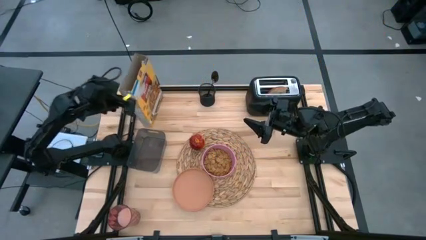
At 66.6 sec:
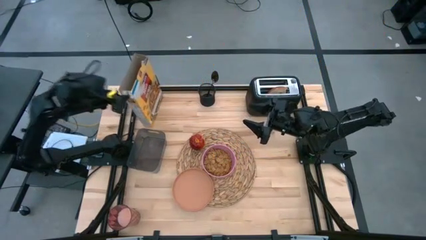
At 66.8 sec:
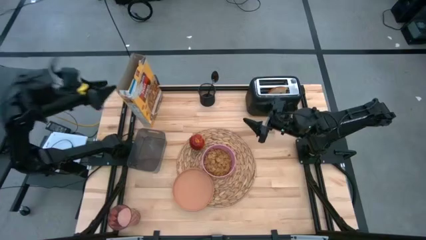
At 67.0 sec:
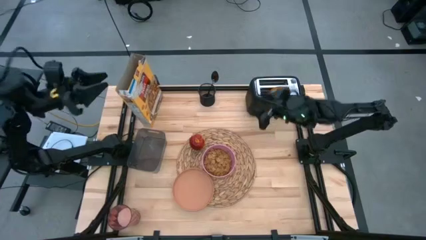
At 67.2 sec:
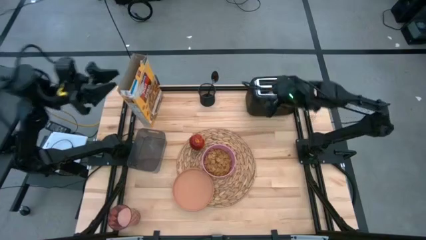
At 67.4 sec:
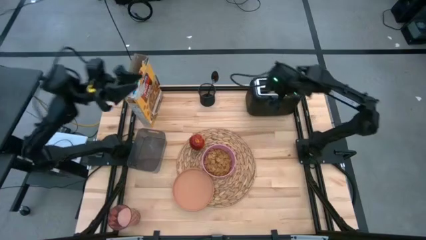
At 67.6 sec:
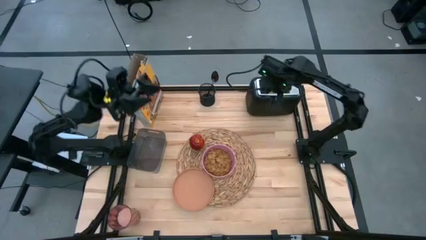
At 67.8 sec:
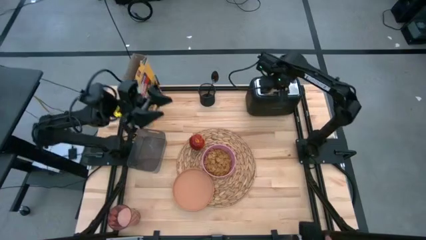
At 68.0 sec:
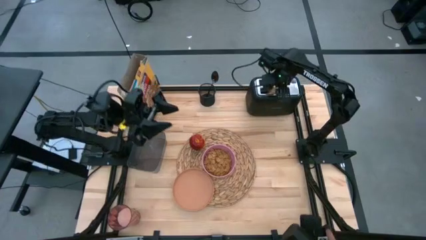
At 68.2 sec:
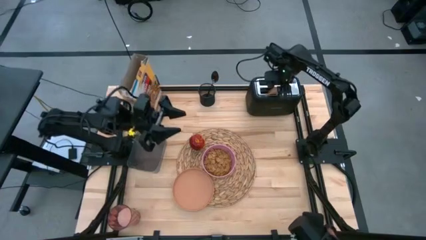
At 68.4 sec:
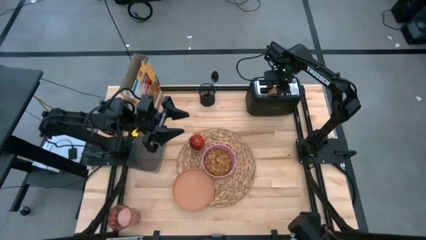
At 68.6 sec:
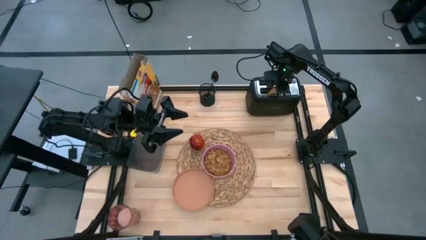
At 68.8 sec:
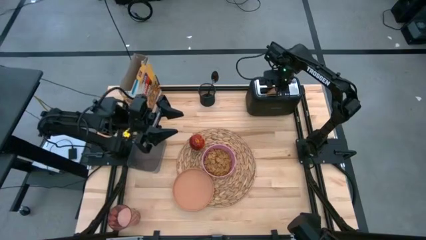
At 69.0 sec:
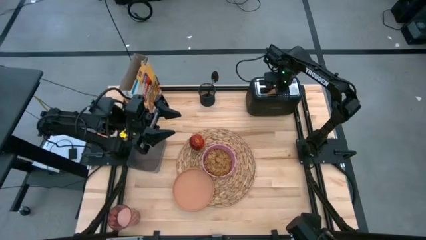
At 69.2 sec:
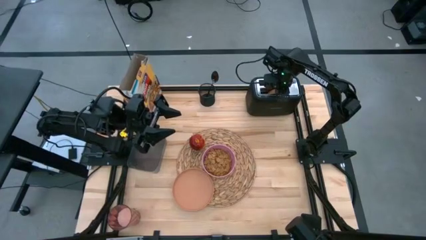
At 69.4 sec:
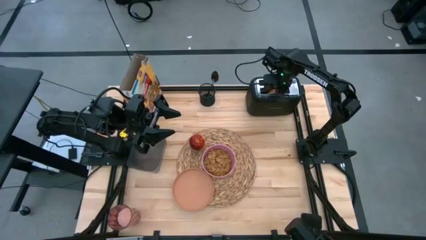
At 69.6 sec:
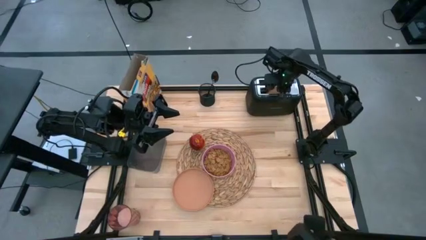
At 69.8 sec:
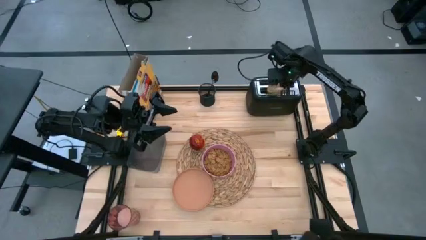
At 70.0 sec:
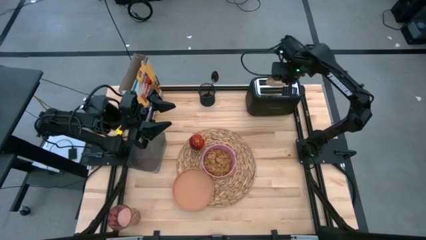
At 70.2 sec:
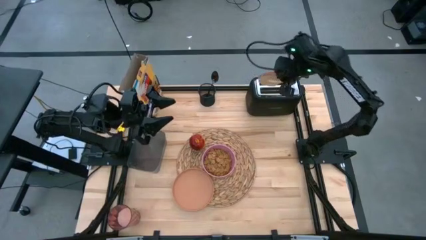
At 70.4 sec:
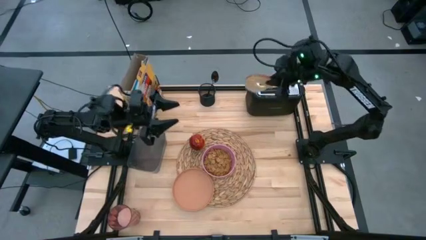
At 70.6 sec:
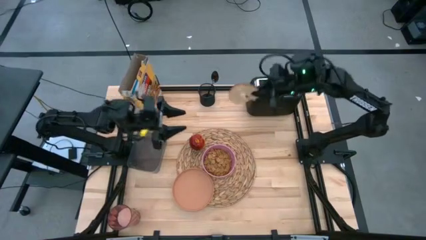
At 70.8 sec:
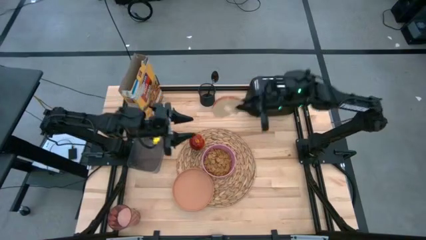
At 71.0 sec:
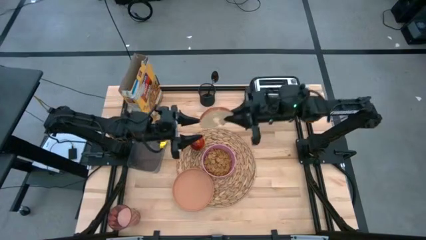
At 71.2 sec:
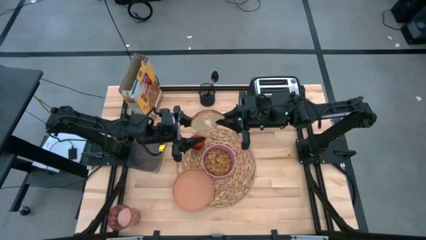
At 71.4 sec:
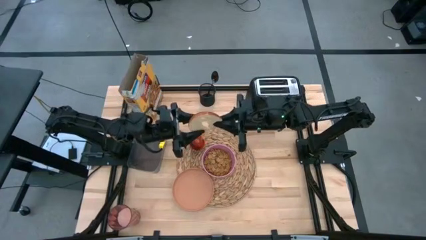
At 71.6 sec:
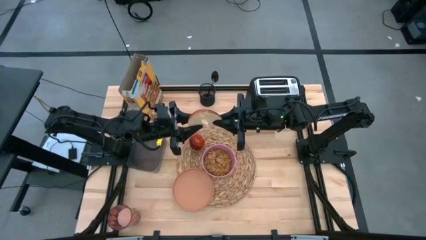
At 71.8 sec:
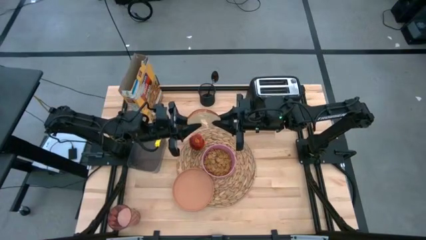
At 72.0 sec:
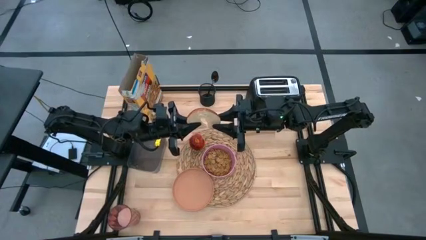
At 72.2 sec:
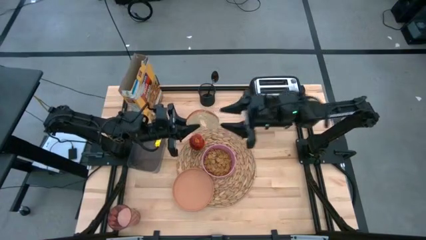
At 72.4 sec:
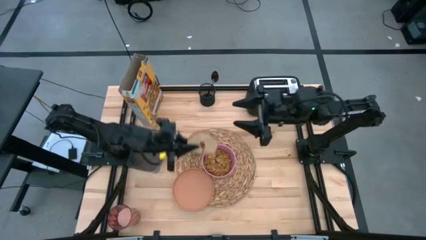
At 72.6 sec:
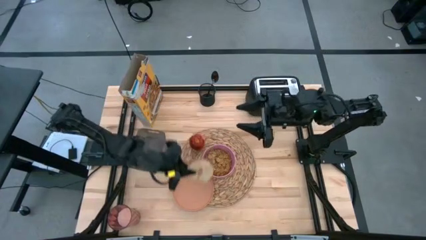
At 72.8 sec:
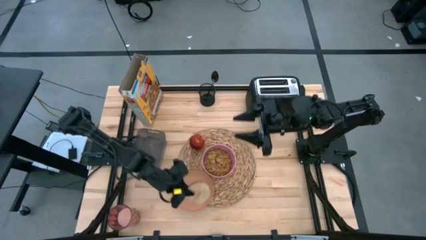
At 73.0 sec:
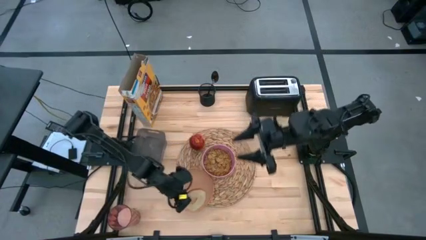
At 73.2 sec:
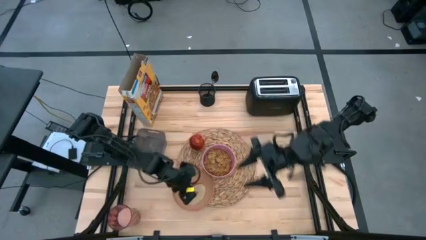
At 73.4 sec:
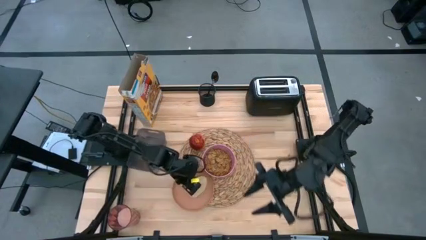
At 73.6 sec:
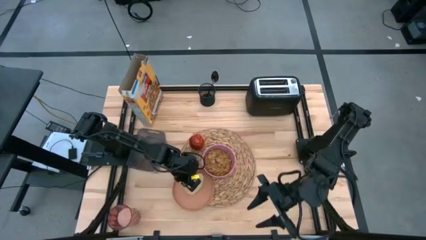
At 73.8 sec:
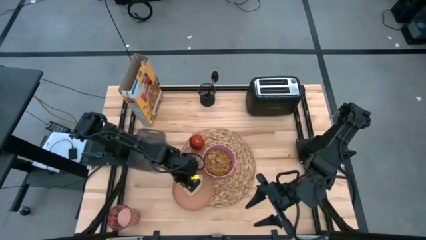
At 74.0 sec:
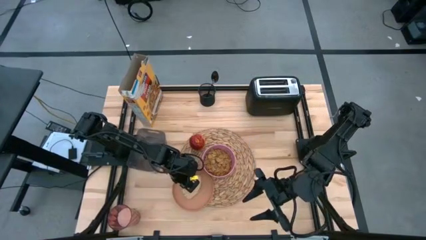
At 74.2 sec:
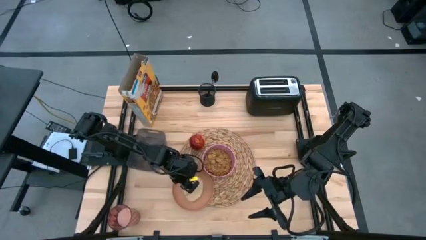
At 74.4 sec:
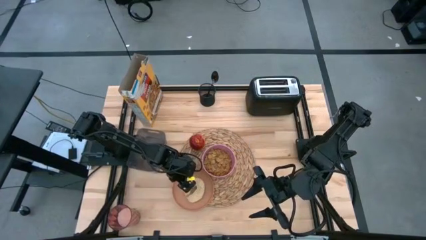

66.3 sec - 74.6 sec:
Task: Arrange a breakfast setting
Put the toasted bread into the brown plate on the placemat

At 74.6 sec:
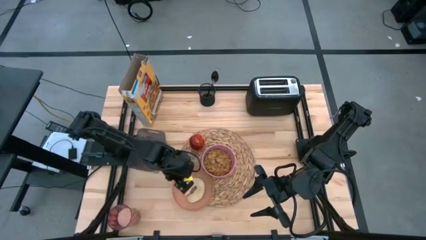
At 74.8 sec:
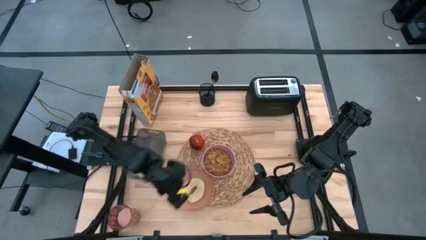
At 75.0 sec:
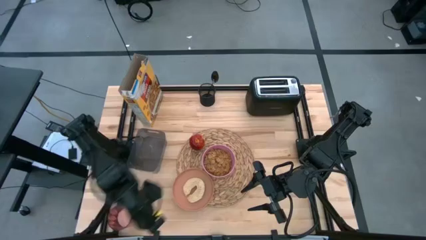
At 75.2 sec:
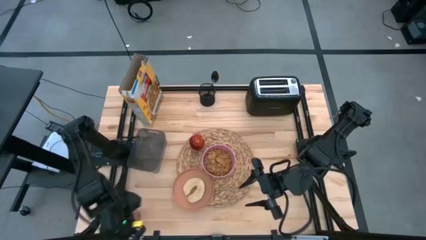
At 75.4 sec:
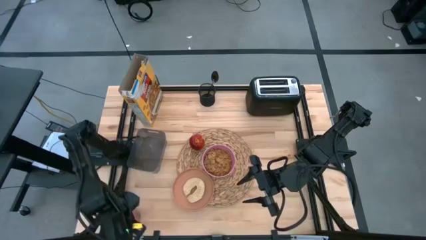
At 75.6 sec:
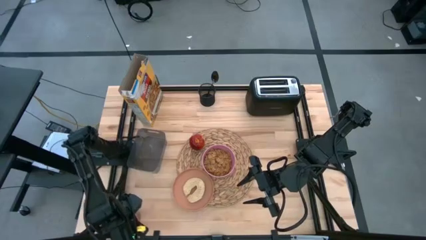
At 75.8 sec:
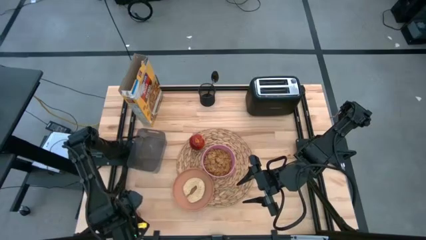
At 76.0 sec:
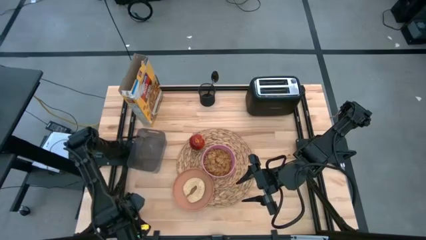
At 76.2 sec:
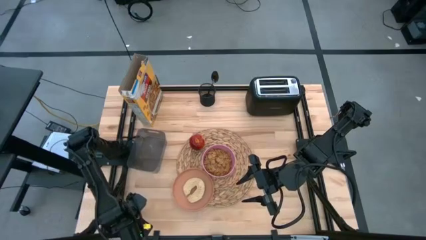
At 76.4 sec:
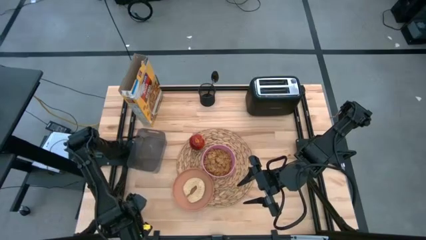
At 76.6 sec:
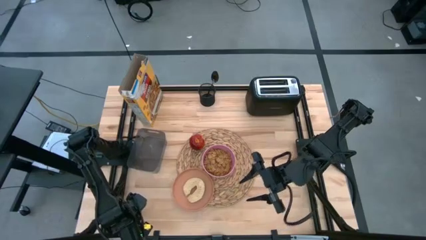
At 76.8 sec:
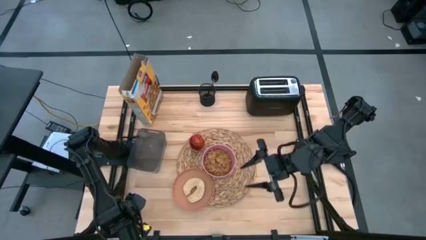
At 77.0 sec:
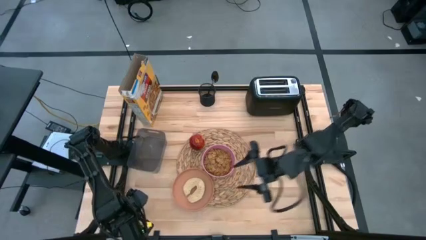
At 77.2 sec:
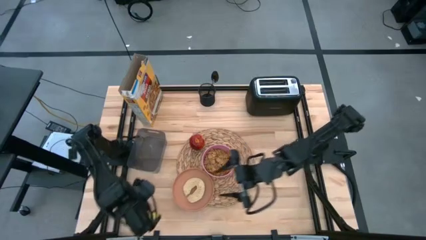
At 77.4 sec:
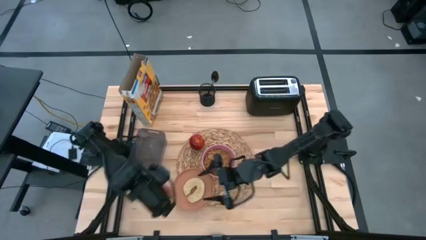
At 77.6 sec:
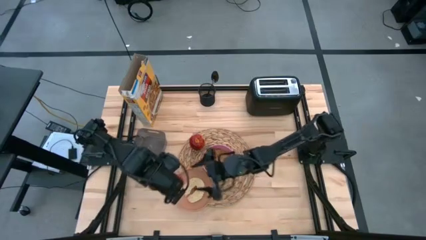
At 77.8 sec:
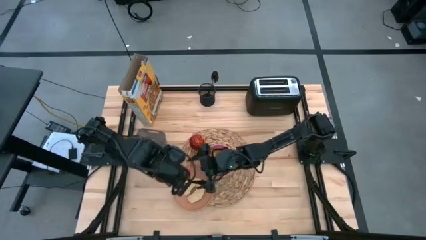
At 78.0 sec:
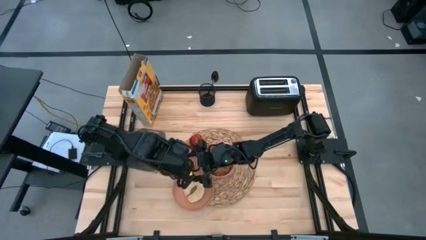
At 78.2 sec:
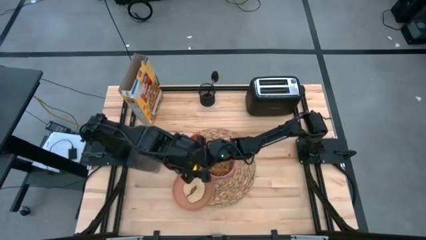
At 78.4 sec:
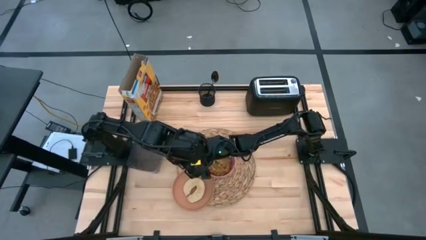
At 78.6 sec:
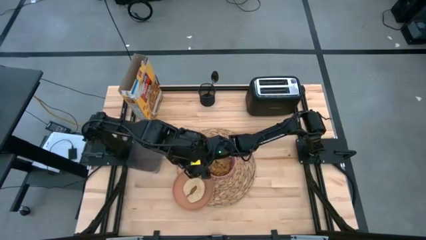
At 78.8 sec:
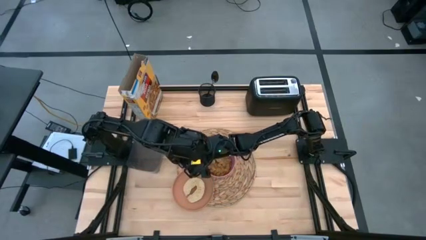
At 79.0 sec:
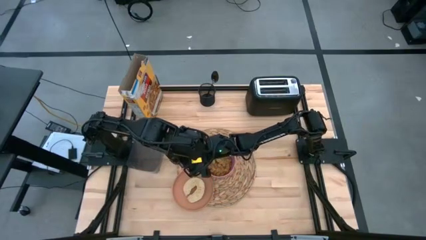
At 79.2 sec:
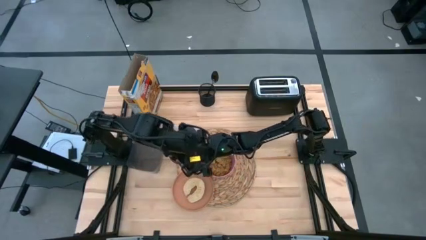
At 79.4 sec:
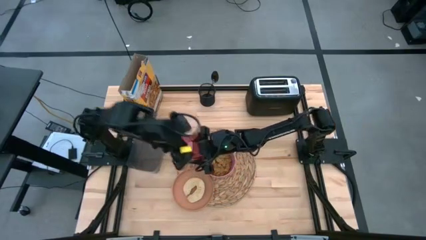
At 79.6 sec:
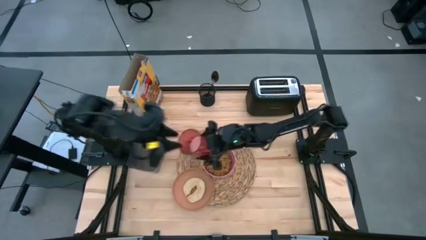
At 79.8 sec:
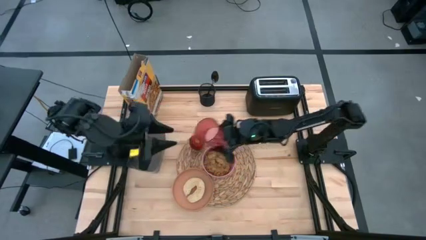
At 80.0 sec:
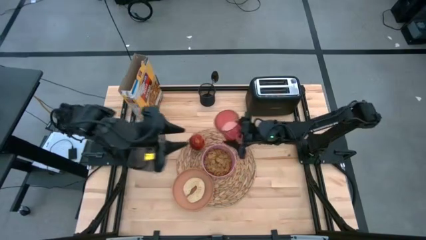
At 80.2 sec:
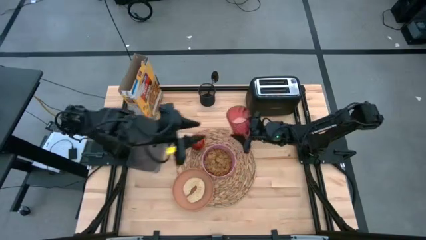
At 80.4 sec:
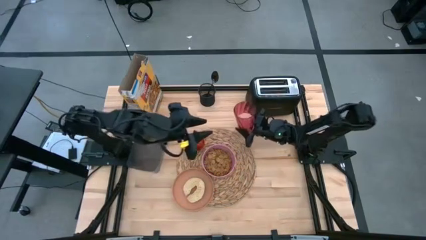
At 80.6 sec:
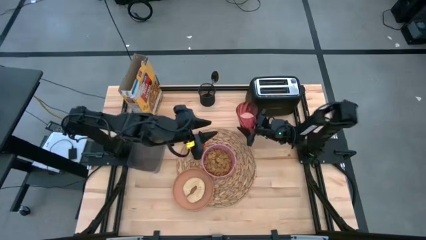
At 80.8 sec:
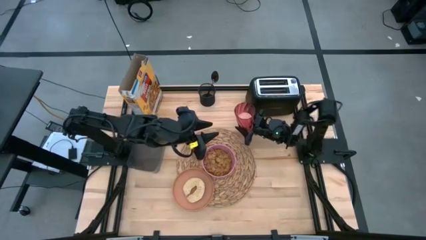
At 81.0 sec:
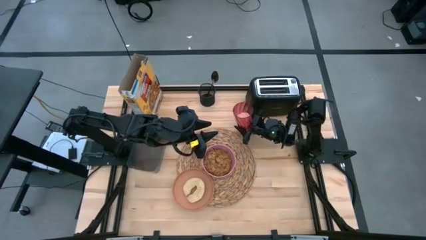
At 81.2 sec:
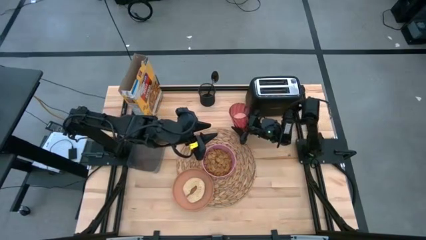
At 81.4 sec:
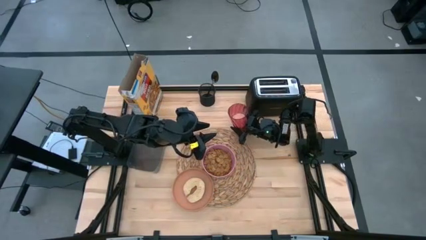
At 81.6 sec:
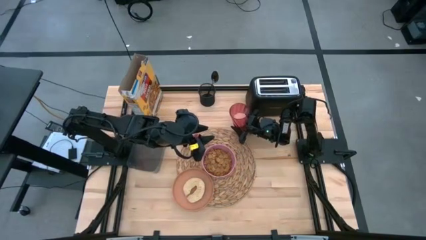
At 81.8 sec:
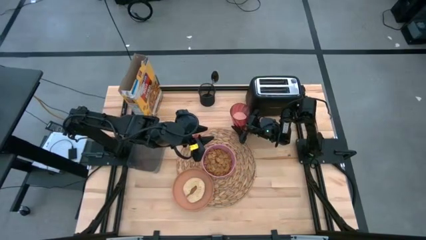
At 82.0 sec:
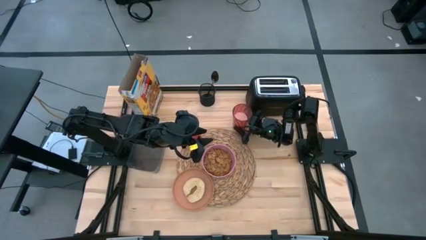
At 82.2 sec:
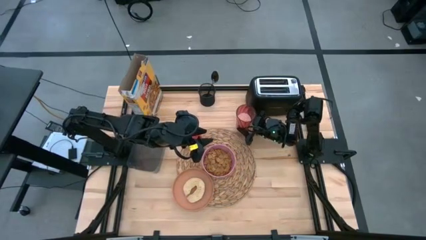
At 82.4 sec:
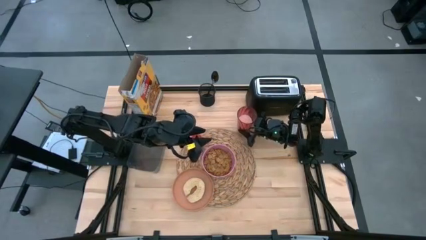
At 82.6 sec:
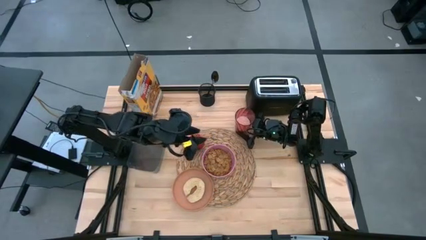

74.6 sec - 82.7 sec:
Put the cup on the top right of the table beside the brown placemat
